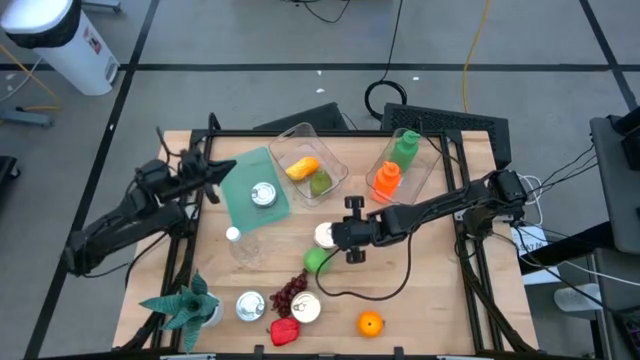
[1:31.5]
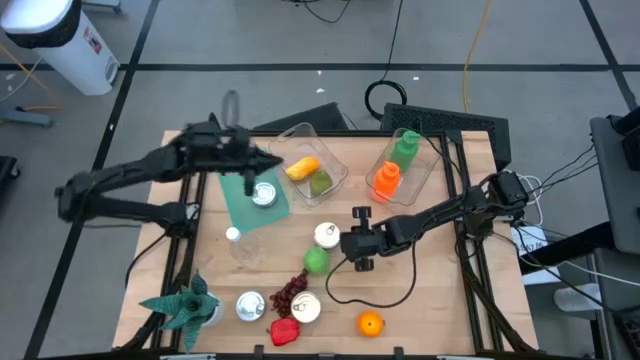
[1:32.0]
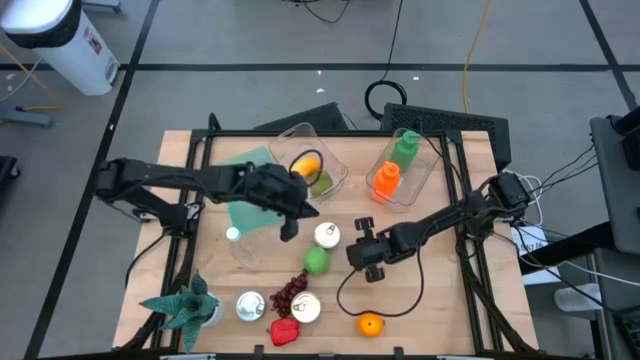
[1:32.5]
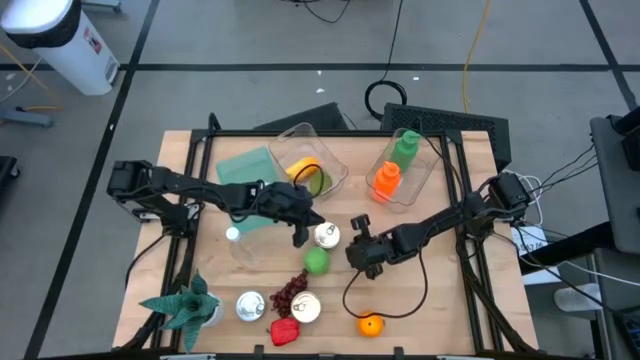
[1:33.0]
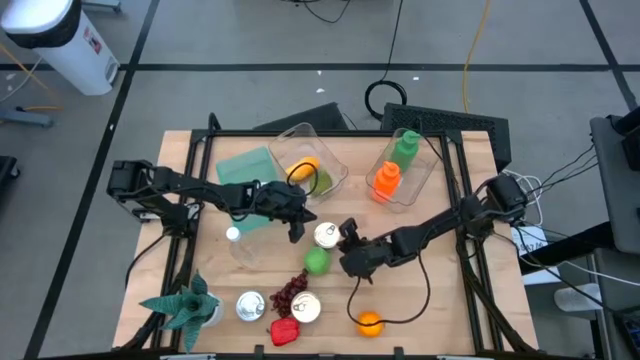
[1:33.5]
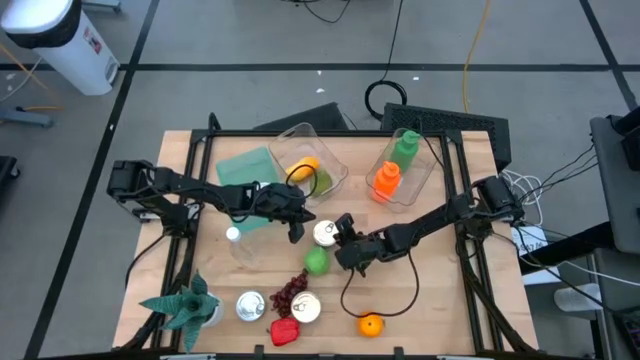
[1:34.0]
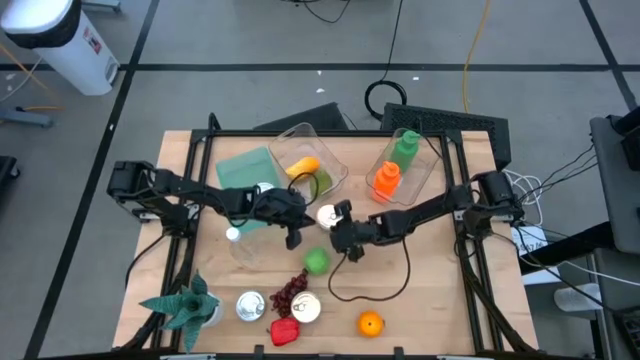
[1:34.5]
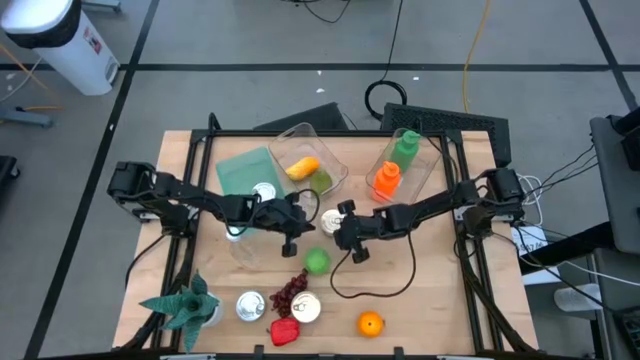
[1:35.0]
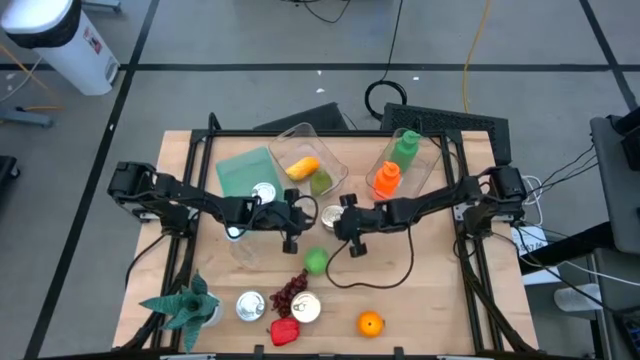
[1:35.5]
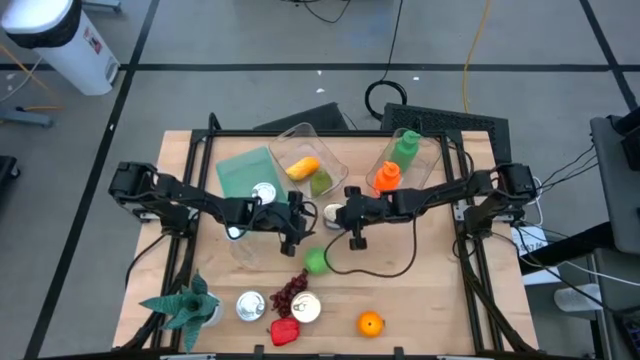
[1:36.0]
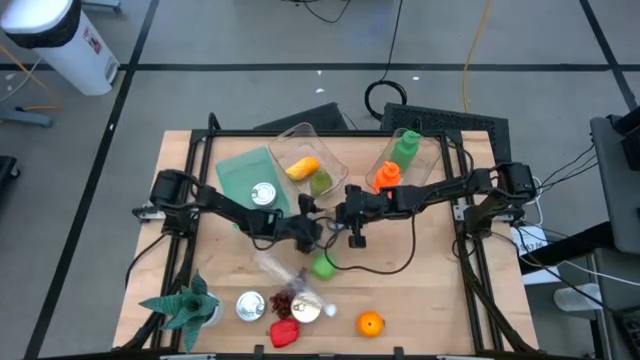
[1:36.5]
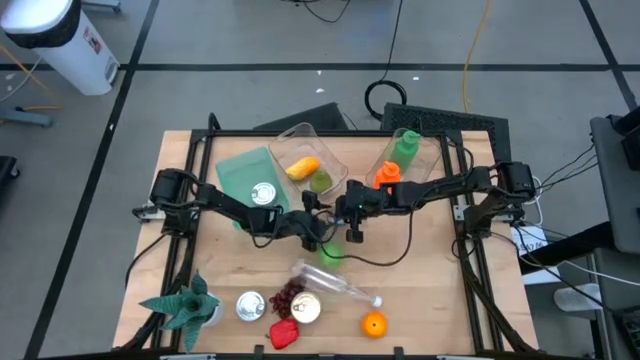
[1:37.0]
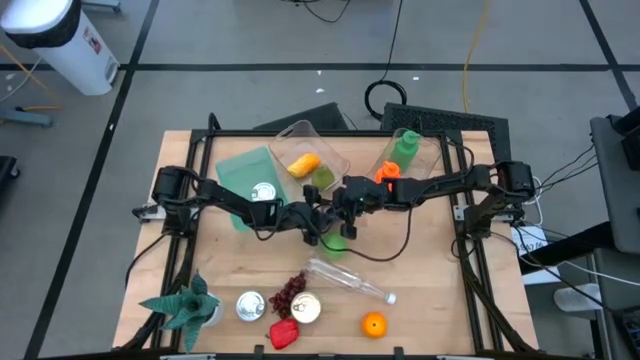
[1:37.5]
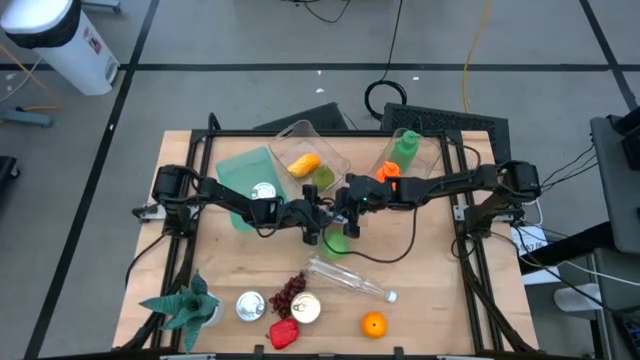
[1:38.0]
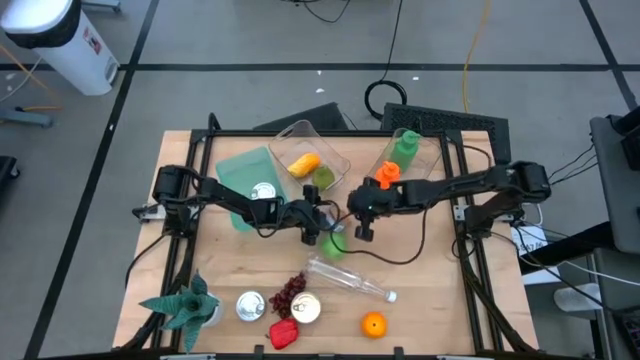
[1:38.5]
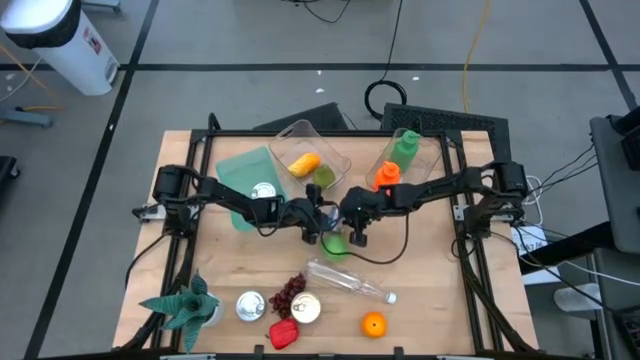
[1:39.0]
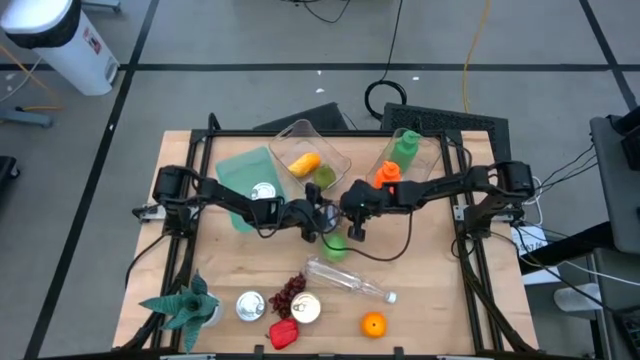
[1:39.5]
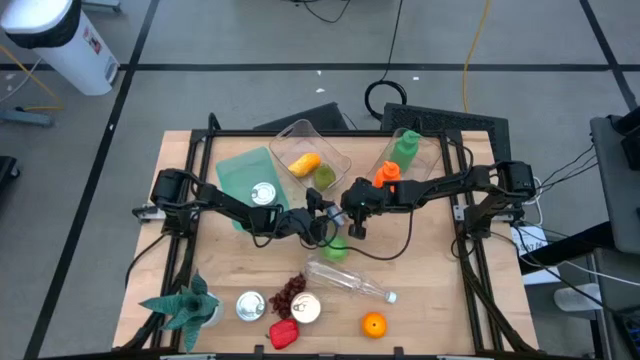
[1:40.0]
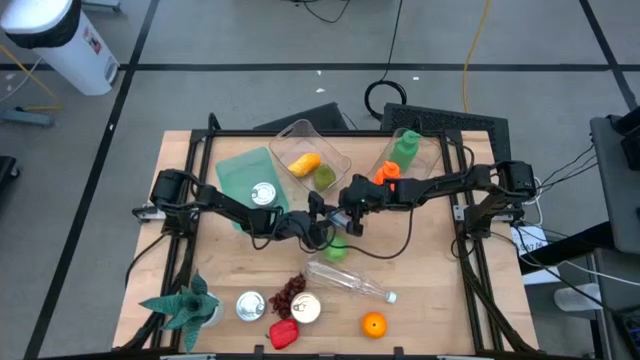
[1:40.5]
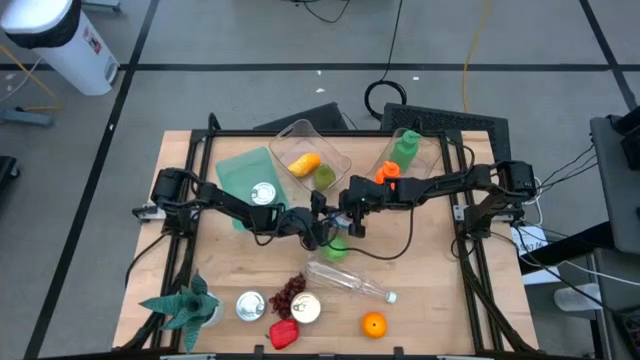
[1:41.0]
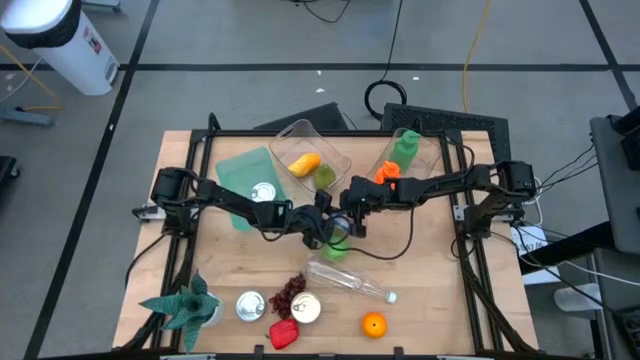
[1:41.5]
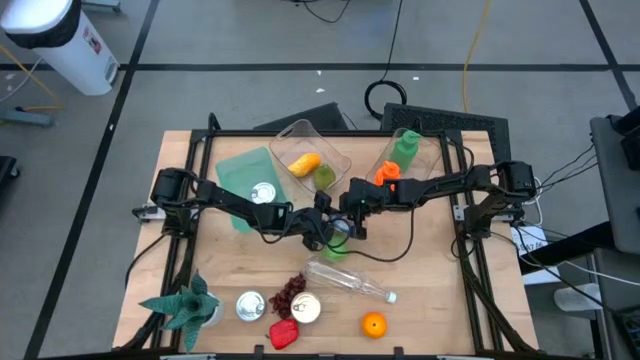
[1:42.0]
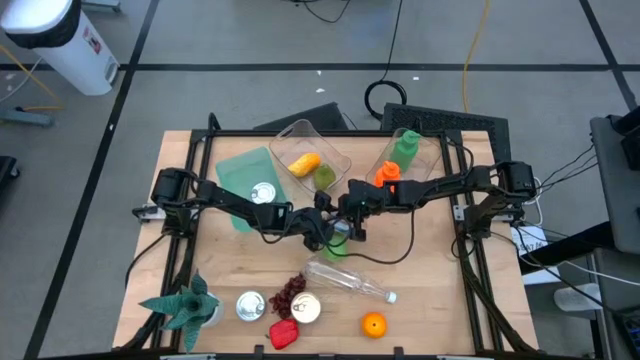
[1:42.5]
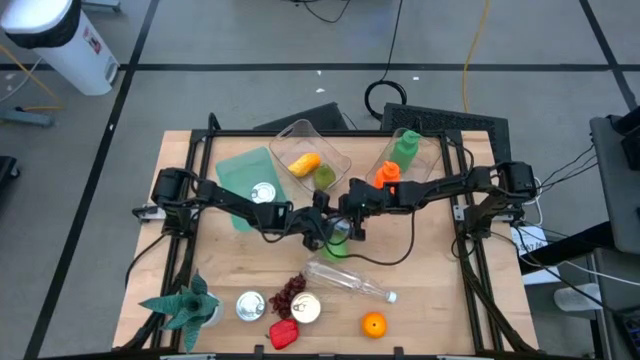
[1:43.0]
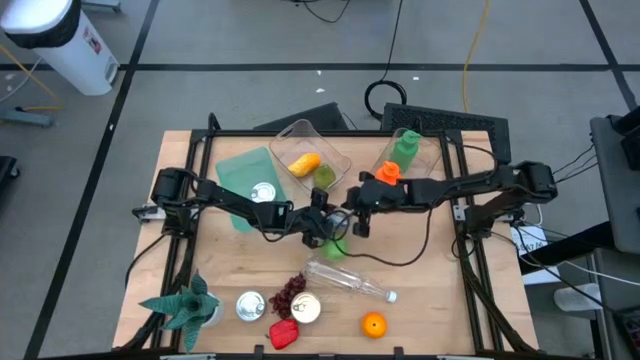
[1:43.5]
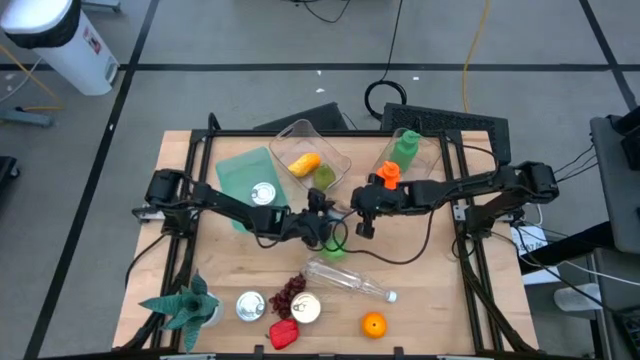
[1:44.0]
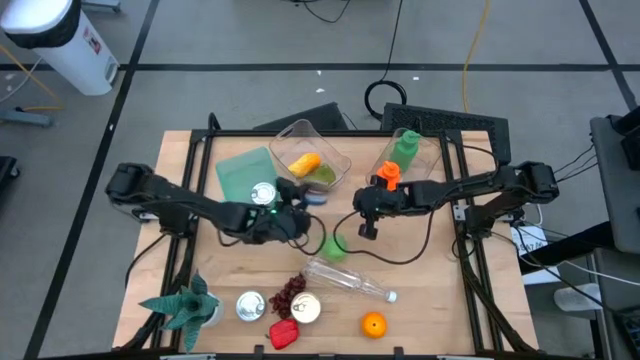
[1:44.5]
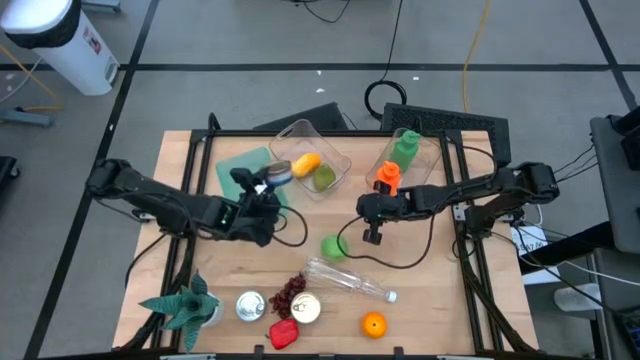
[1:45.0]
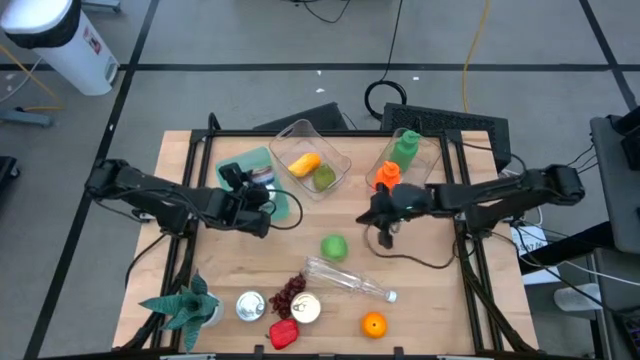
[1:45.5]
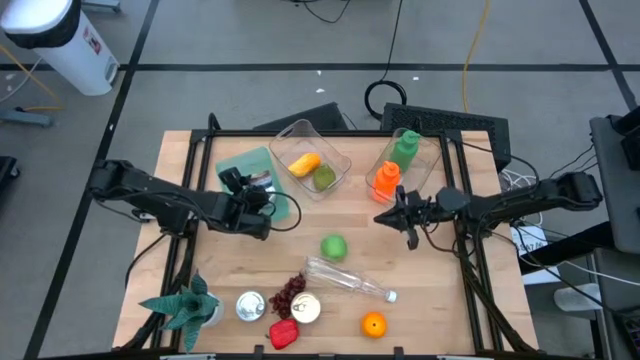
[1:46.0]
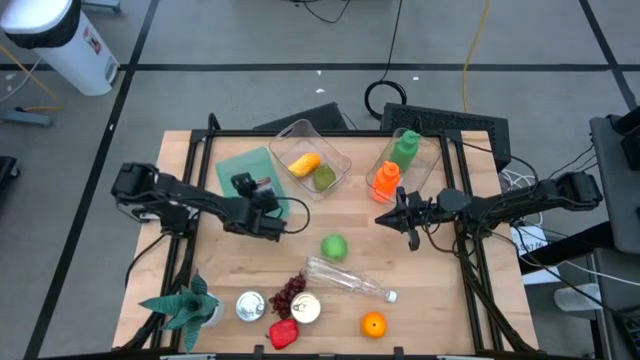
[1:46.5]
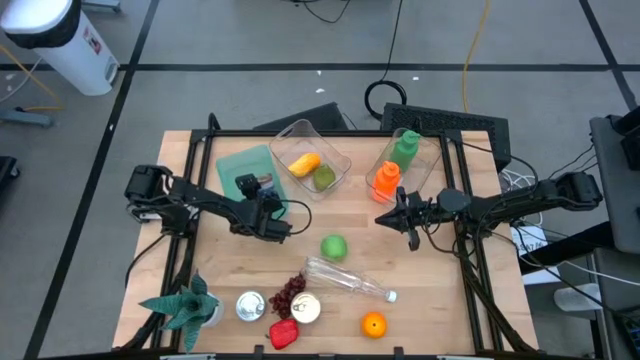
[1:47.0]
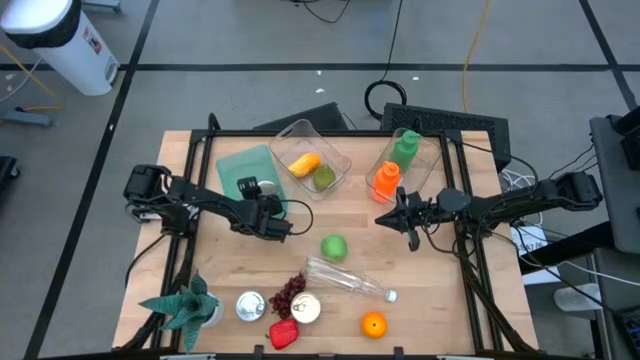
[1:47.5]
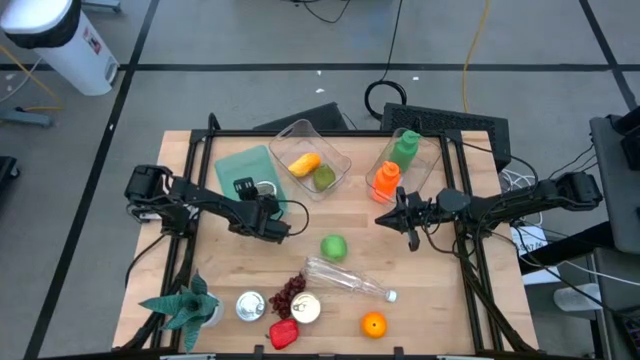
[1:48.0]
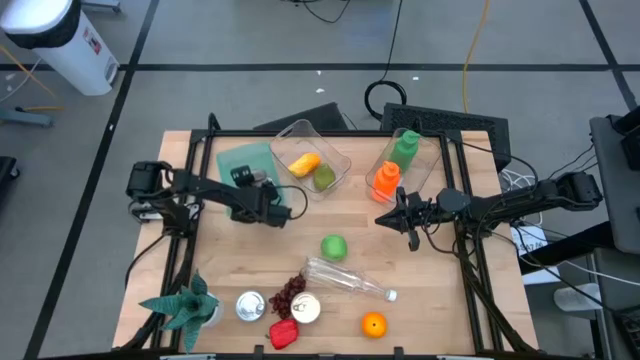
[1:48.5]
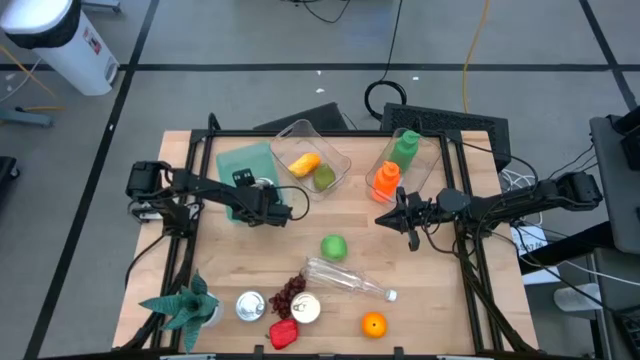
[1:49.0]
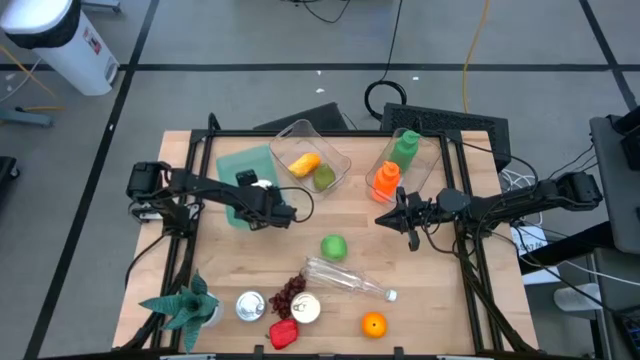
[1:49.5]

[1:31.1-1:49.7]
Task: Pick & Place Food Item
Stack the blue tuna can on top of the green tuna can into the green bin

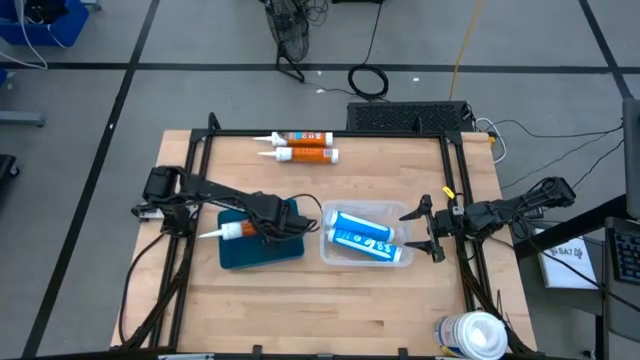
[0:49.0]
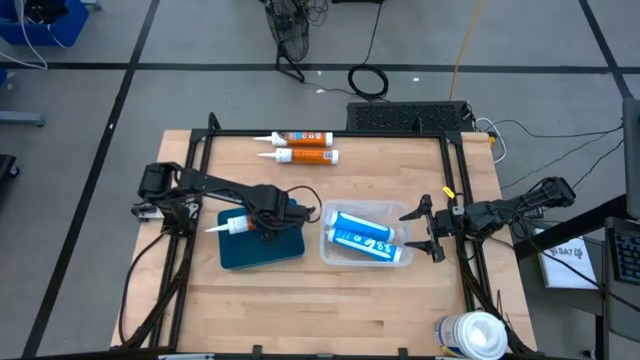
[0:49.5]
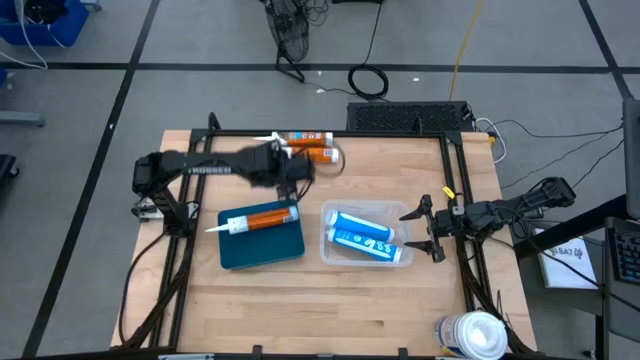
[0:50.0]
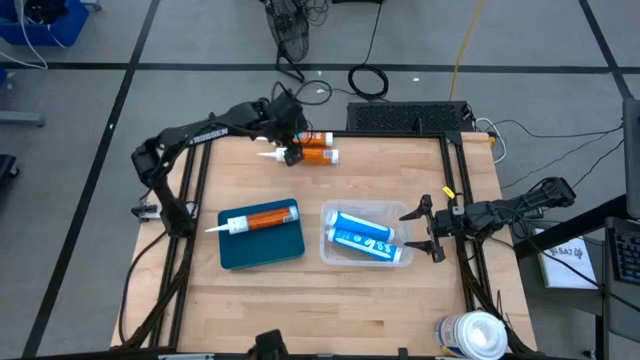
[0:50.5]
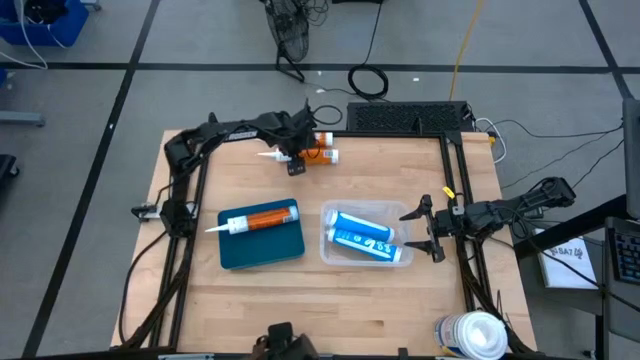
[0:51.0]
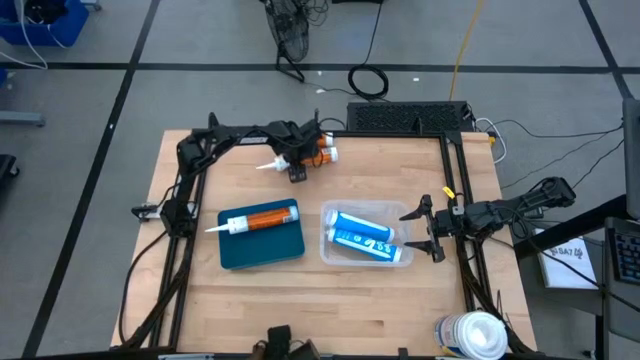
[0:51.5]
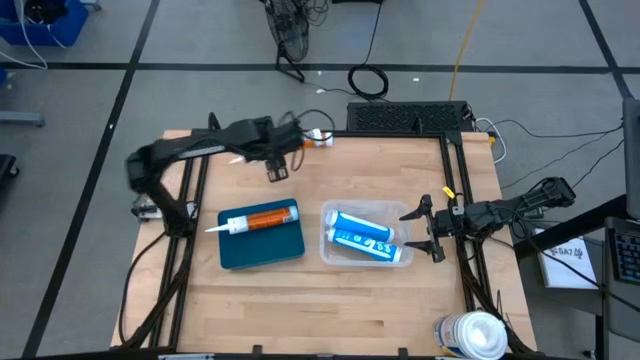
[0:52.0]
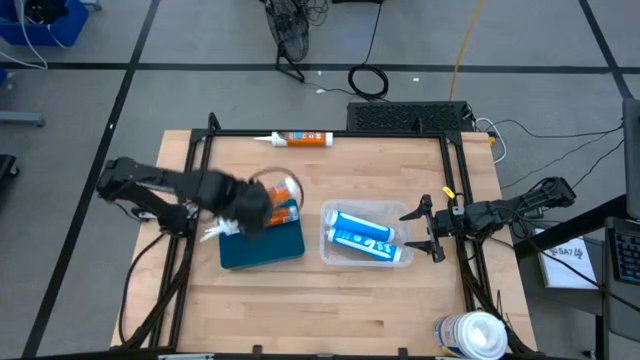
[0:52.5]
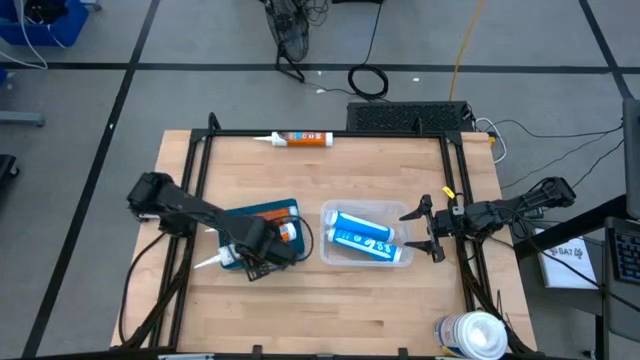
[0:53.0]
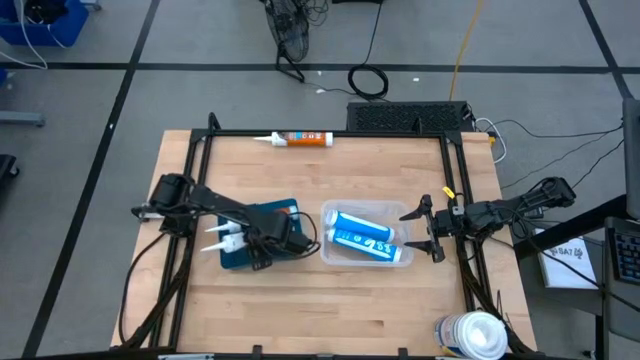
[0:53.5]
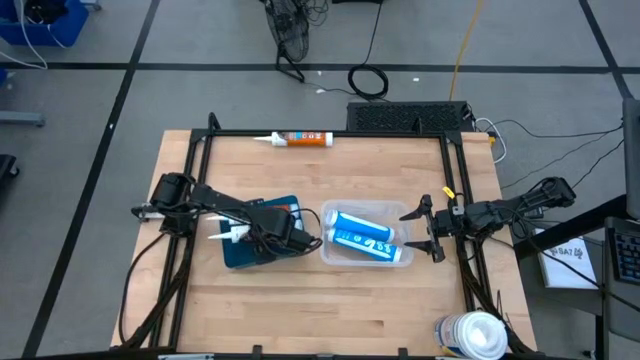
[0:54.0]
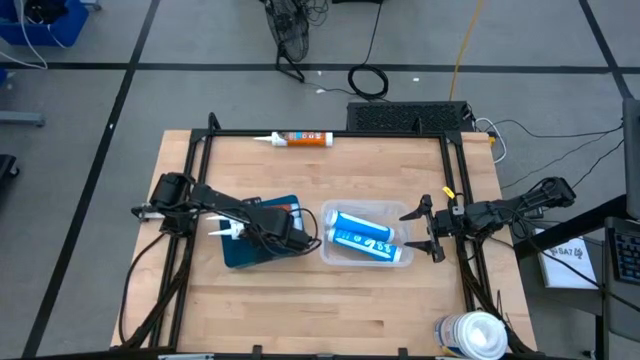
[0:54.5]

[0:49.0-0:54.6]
Task: Pick & place silicon tubes, Sealant and Lysol wipes
Put the bottom orange sealant bottle into the blue bin
